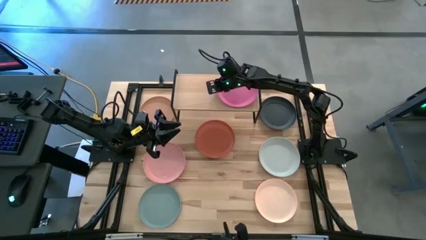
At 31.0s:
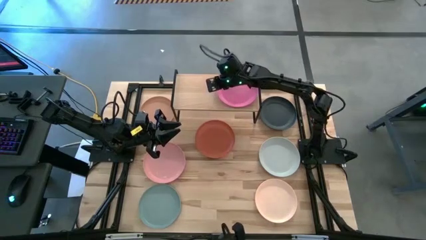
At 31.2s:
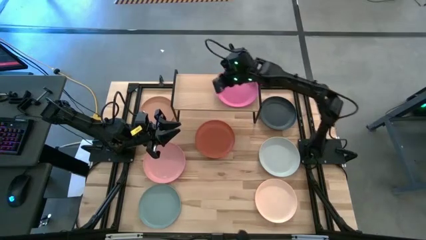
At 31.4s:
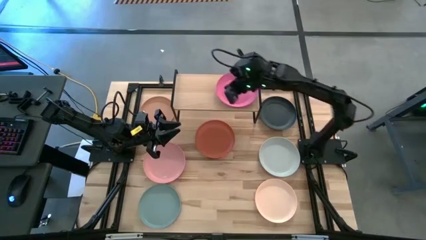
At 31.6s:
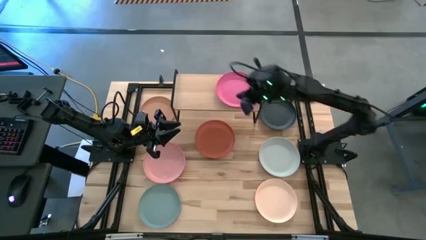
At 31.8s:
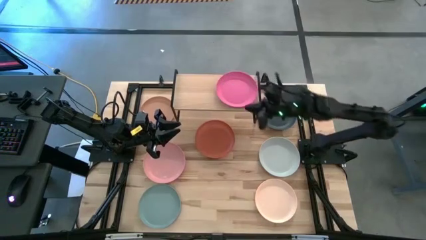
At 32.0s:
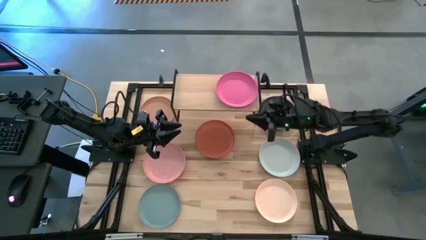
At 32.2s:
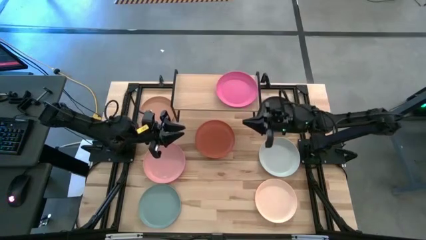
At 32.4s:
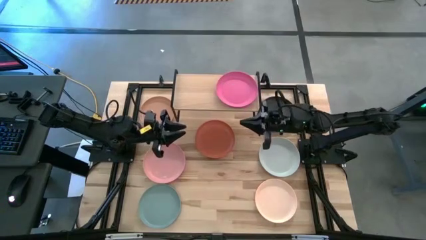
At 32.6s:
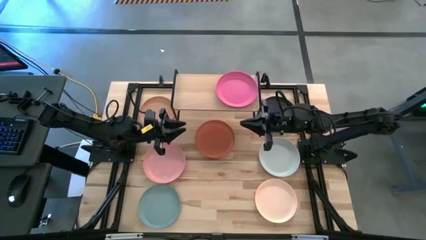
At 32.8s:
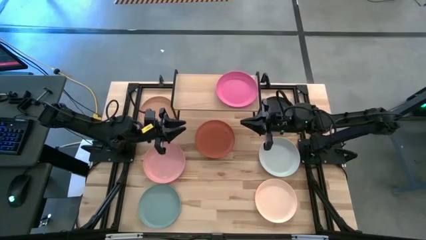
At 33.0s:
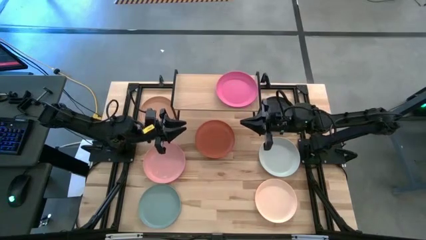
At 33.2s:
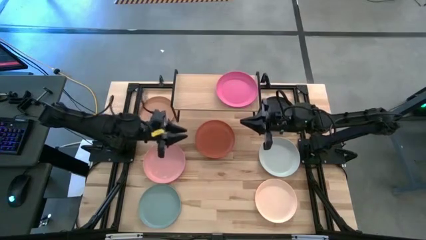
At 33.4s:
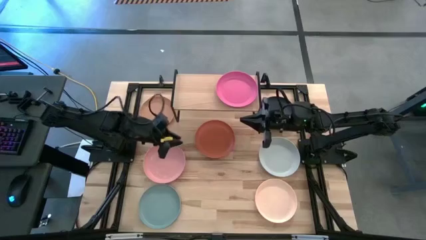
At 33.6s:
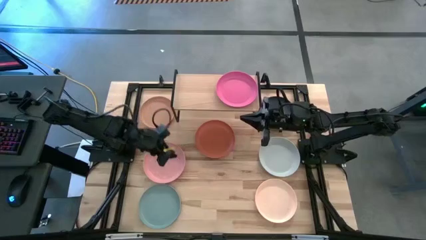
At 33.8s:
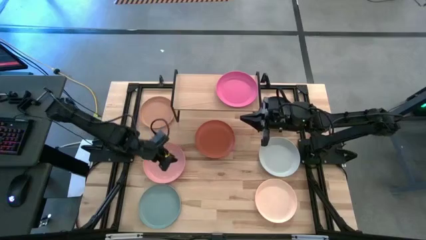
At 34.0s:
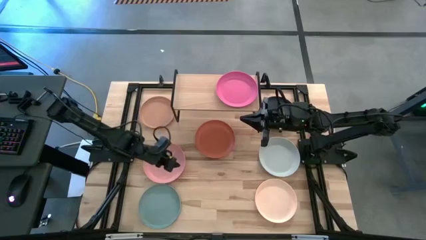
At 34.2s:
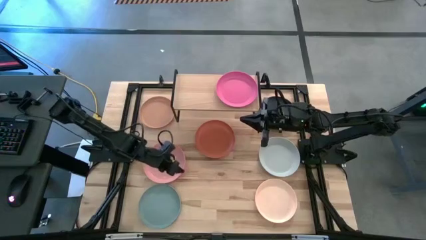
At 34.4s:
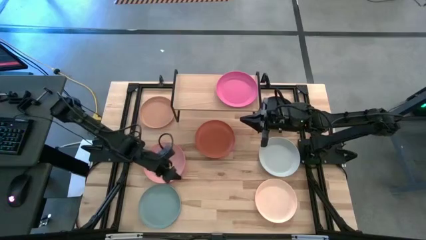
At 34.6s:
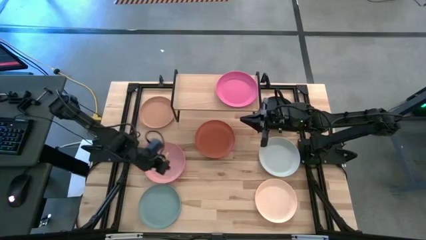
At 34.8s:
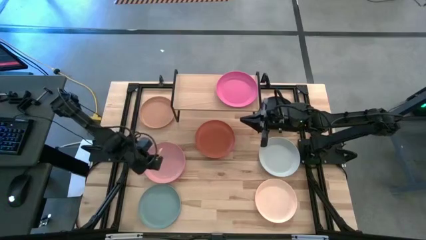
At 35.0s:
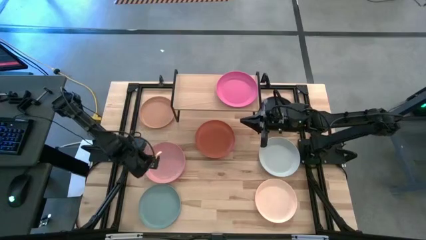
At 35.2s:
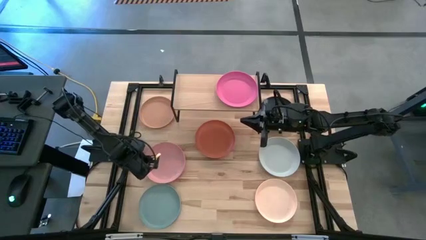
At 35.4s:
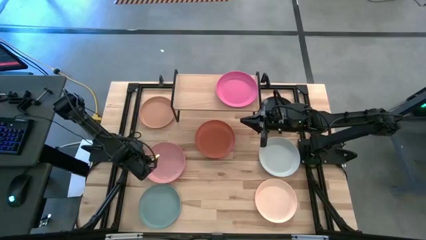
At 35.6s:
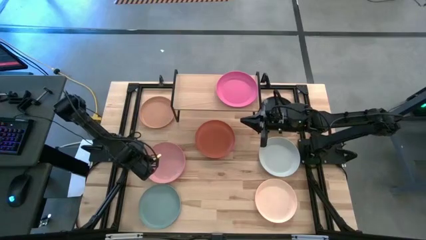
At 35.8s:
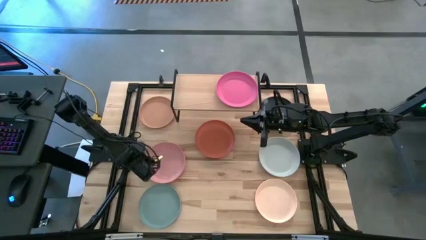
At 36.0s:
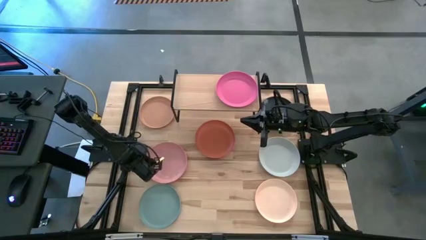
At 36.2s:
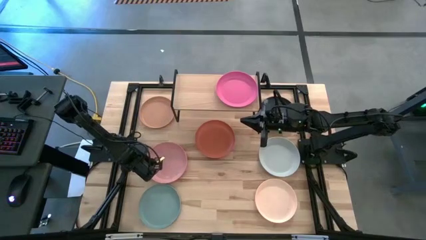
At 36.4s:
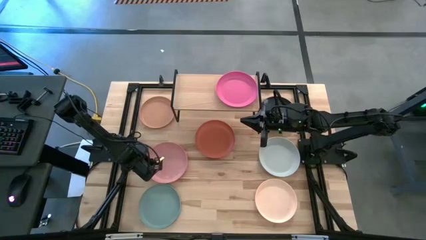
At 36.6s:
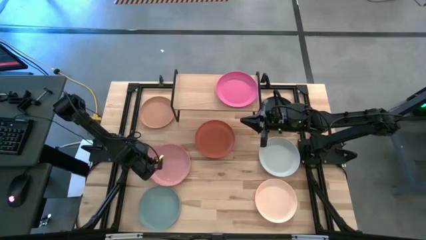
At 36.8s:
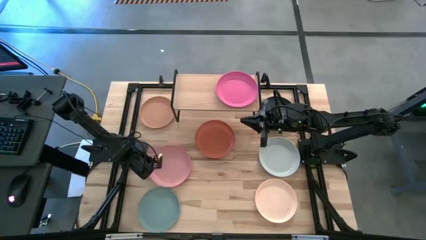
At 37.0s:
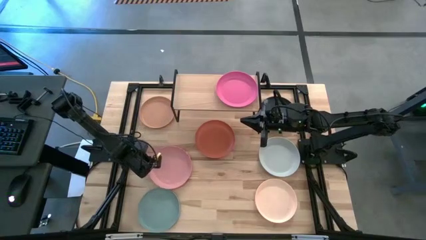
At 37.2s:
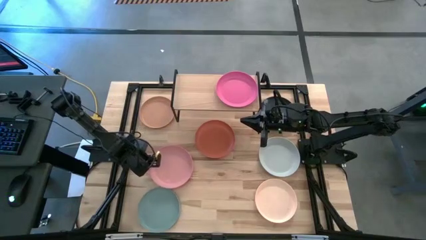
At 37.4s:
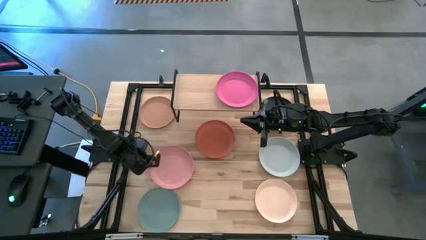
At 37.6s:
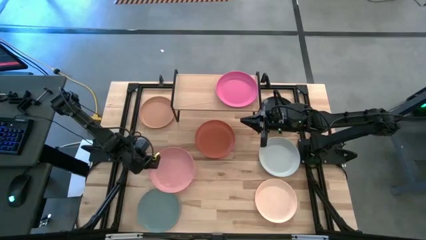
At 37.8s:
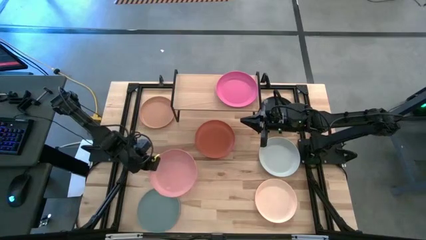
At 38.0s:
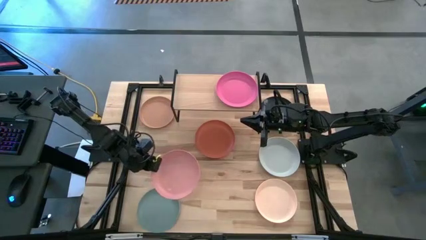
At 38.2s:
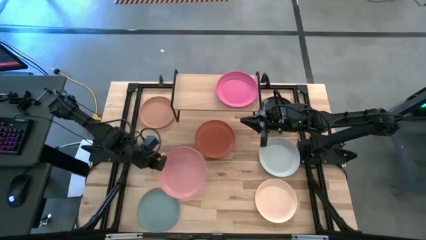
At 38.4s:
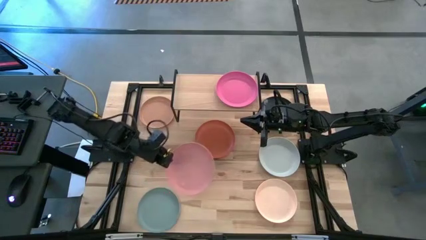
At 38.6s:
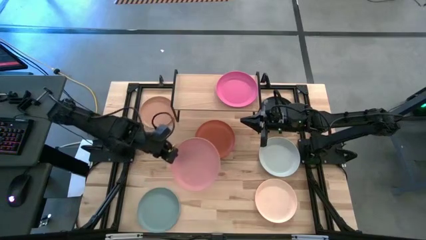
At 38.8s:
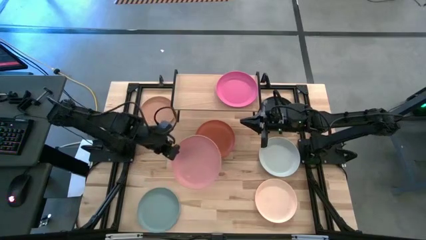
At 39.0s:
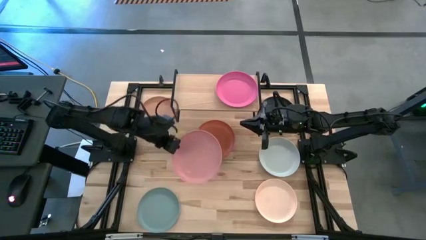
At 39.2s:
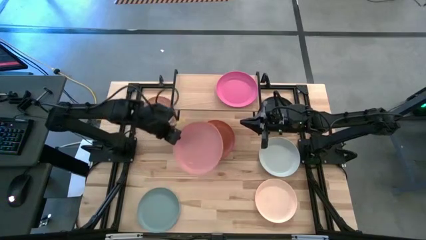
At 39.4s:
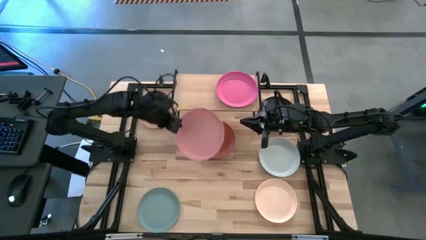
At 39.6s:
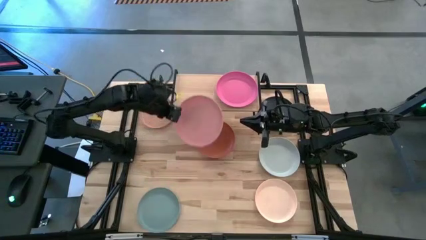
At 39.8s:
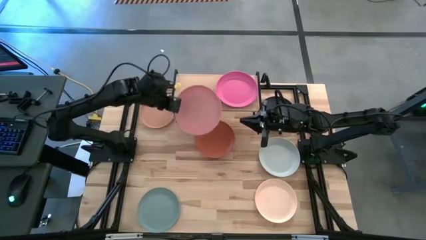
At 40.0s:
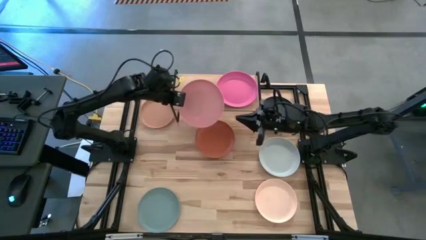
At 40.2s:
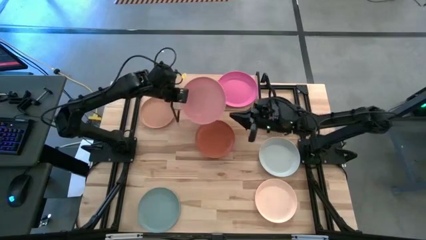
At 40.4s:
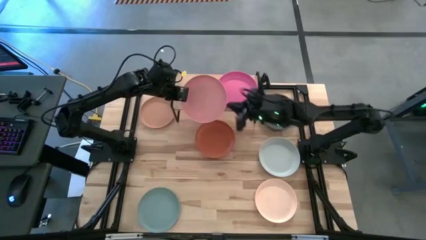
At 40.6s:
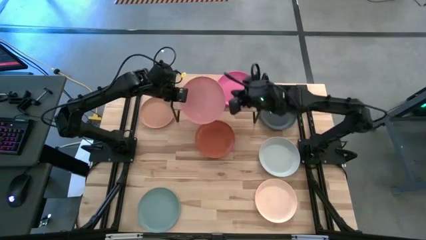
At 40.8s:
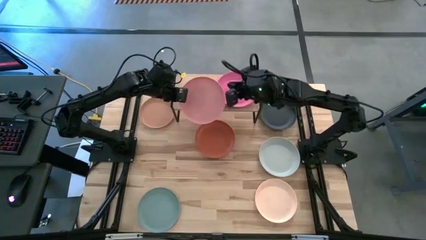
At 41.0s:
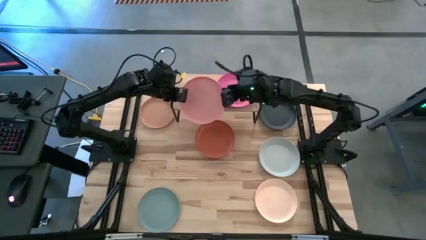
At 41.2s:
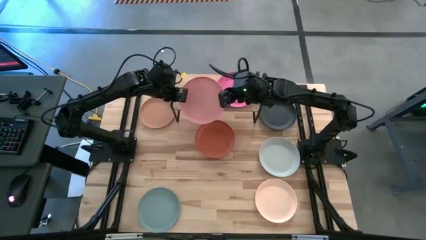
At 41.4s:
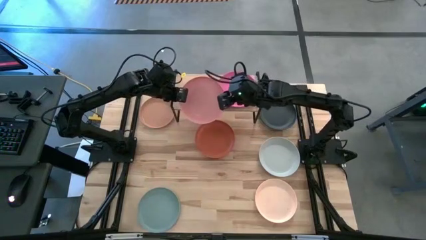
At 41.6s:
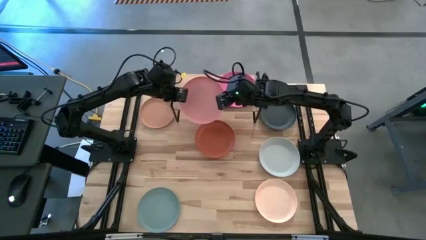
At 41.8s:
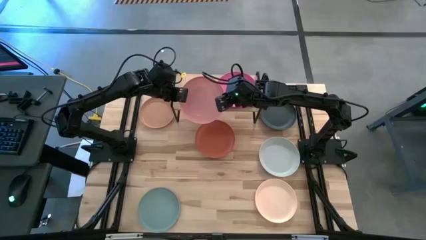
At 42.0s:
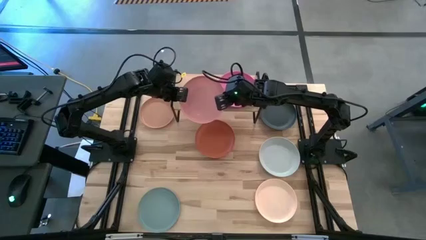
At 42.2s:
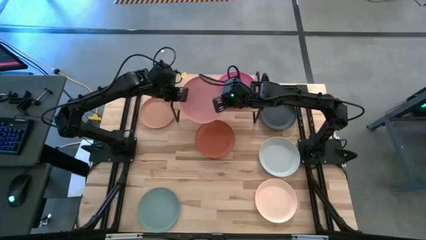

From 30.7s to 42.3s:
Task: Place and stack plates onto a shelf
Put the light pink plate on the shelf

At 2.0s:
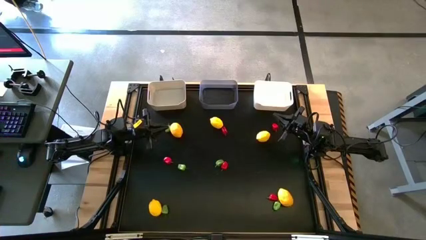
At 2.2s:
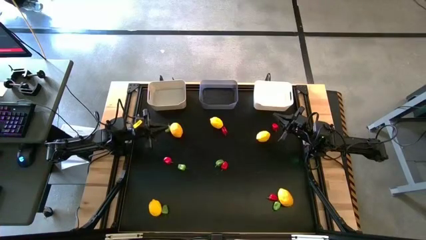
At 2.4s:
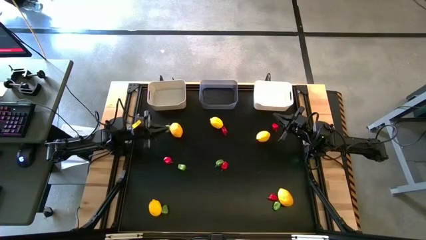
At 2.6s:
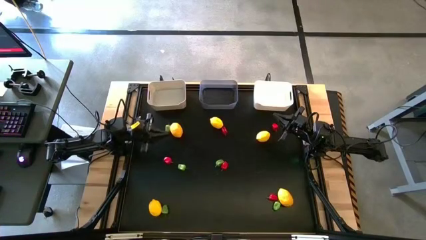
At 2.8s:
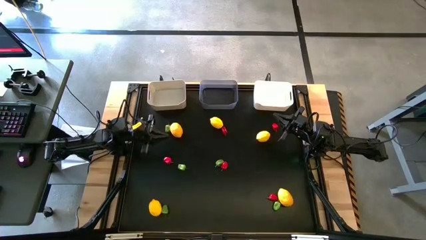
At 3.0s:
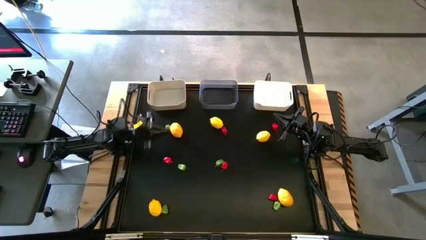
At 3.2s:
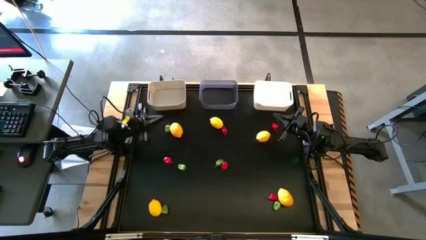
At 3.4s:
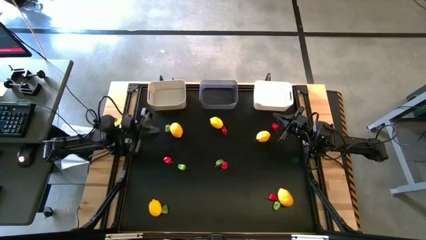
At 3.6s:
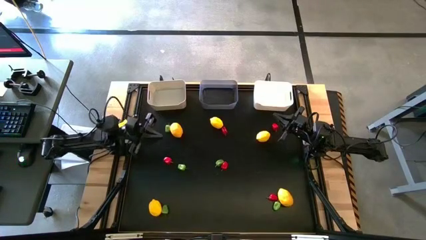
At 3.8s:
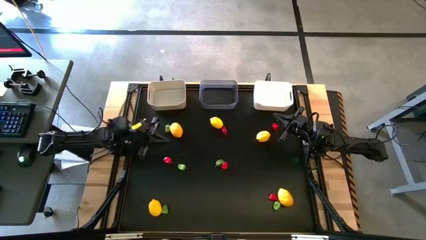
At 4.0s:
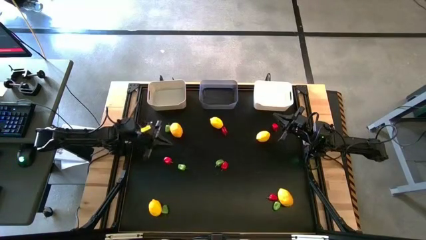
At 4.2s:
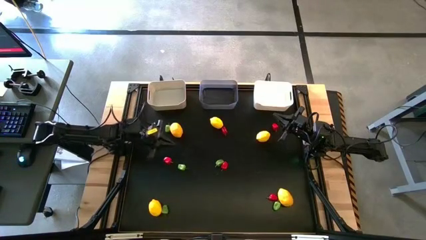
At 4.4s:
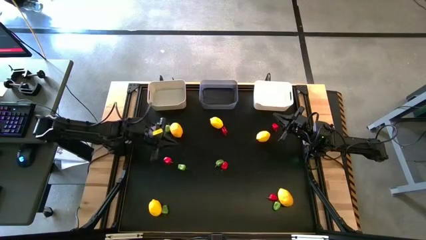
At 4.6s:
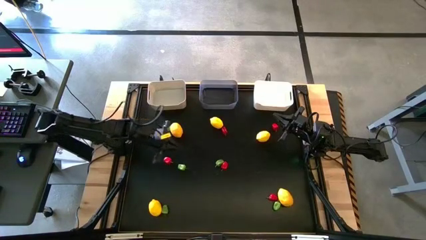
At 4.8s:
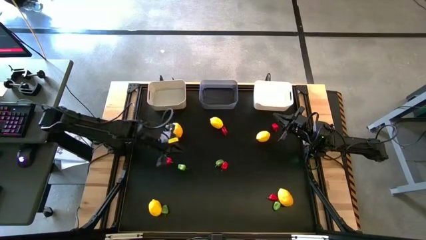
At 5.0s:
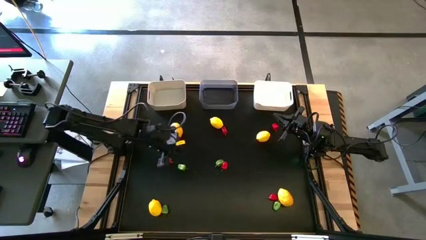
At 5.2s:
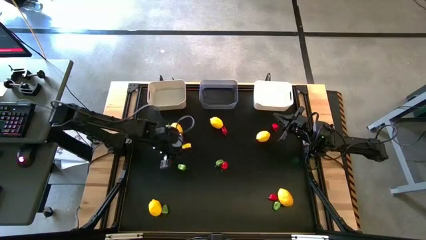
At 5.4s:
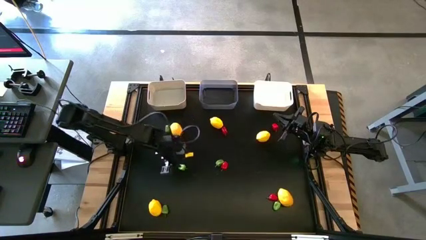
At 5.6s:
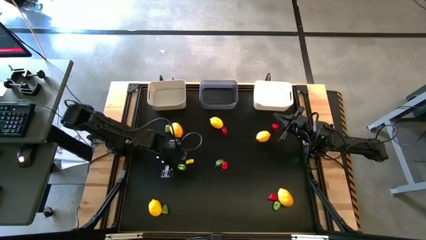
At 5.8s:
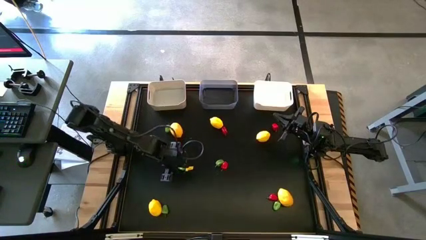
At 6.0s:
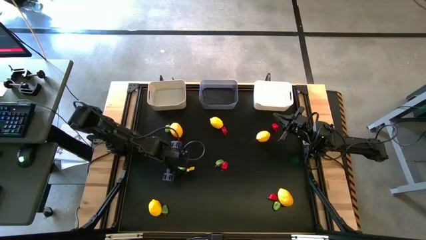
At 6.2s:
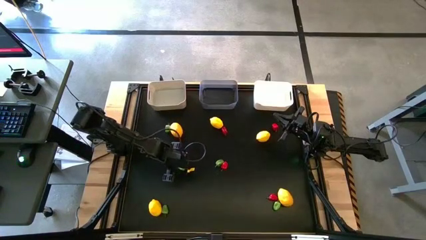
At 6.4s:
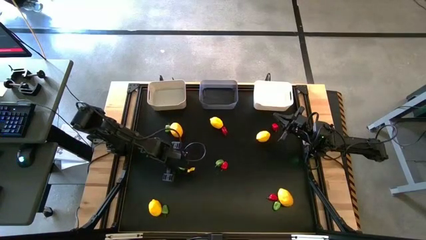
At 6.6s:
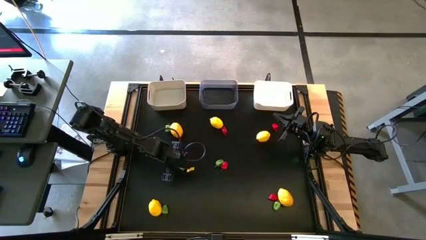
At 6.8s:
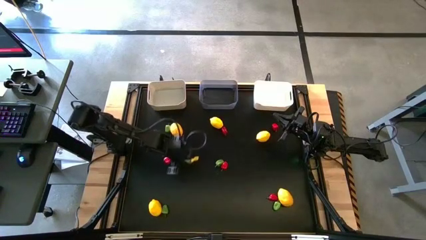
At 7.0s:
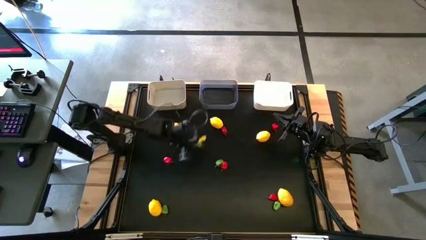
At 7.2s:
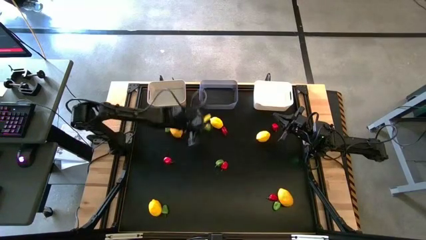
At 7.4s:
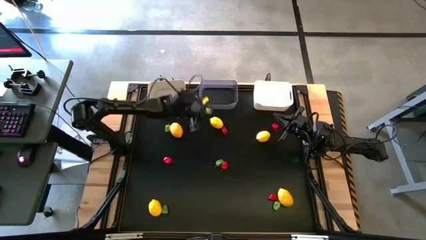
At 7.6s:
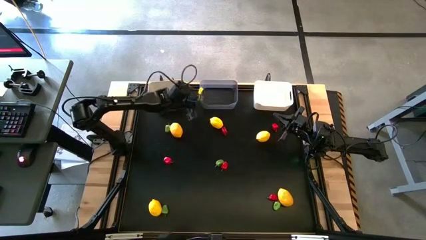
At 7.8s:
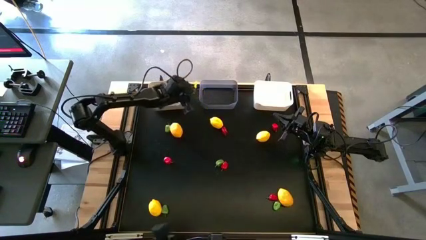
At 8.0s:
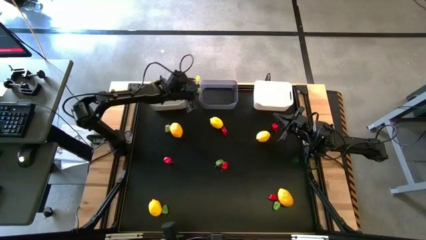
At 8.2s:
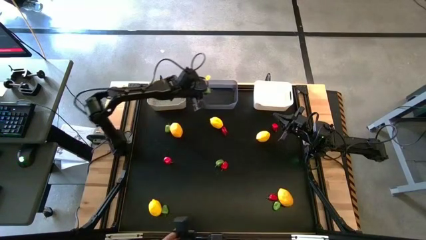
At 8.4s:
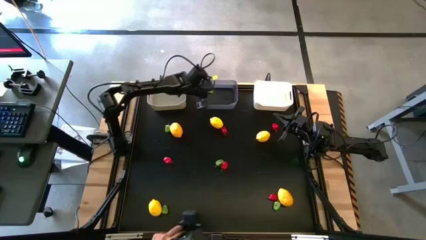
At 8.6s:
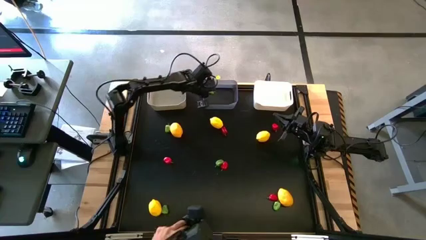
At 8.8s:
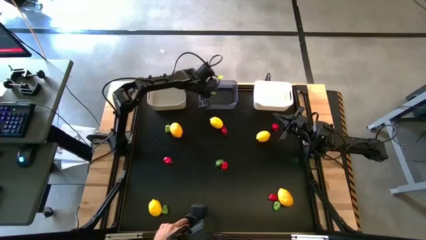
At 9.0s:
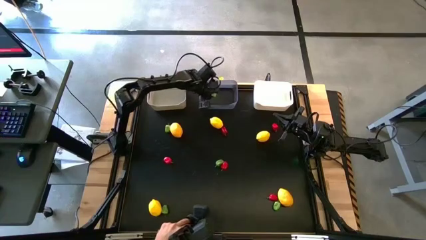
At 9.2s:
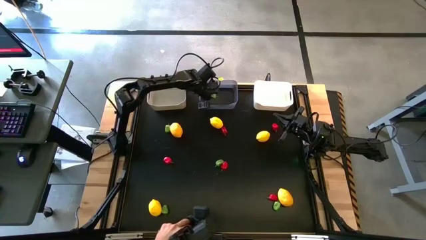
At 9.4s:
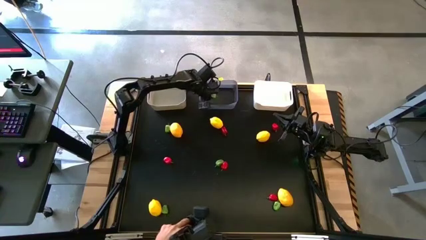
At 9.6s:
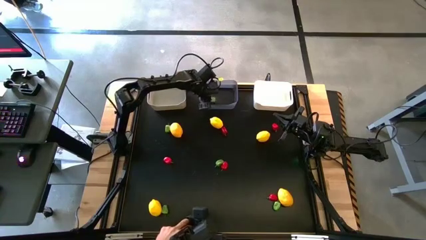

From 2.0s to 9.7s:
Task: Sort produce into baskets
Put the green bell pepper into the transparent bin
